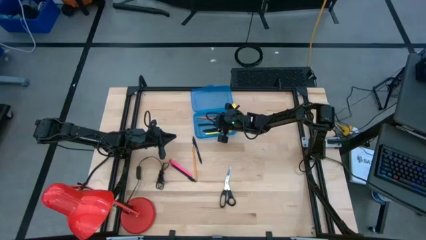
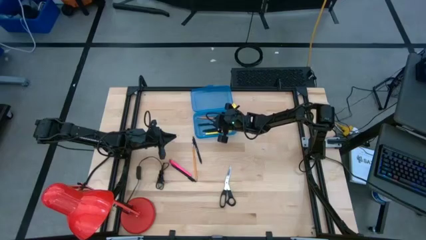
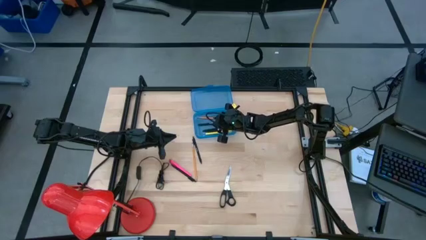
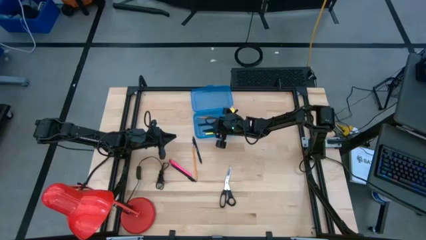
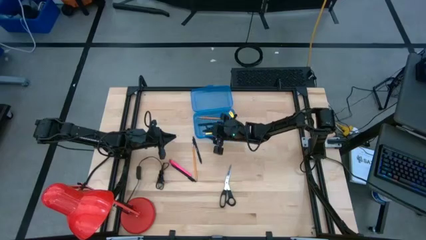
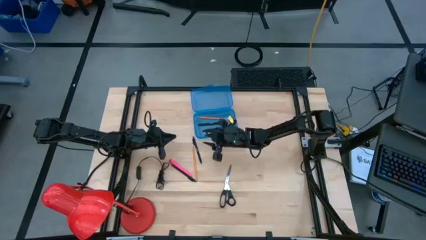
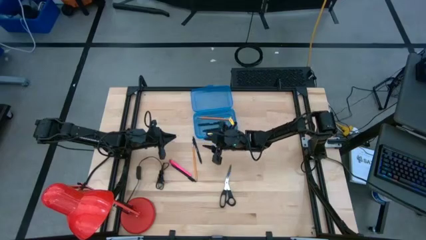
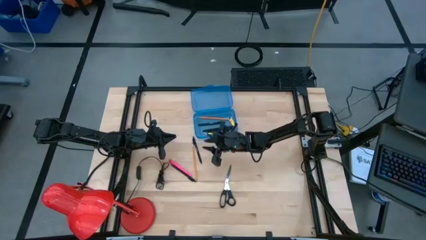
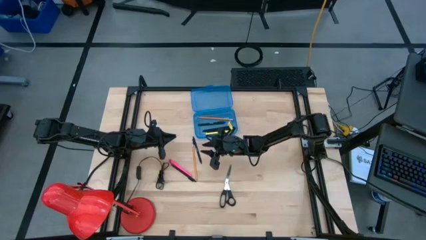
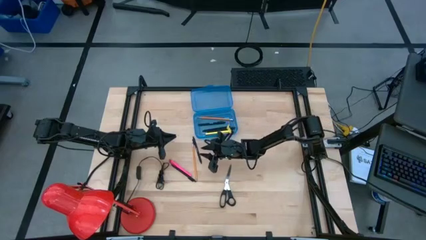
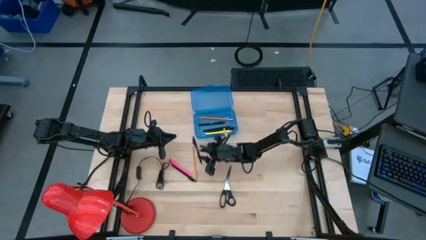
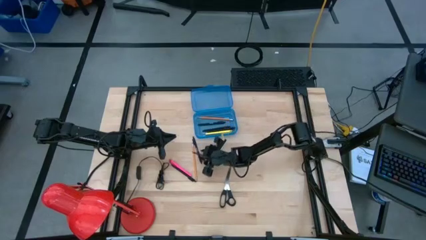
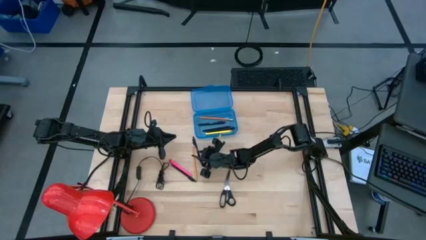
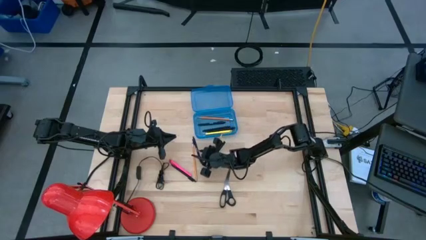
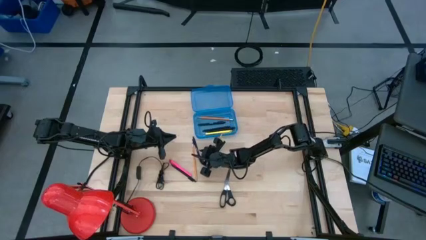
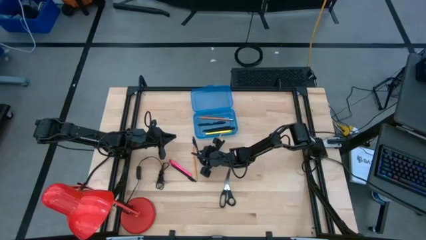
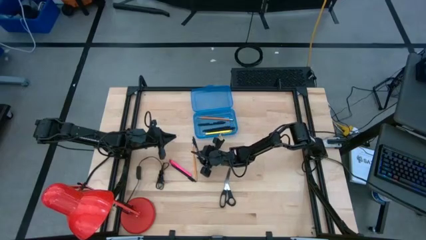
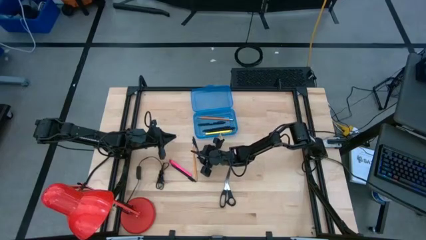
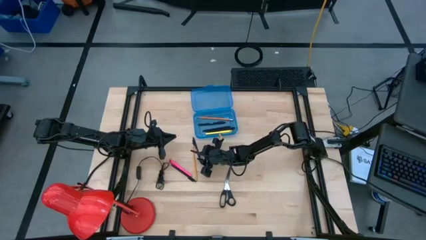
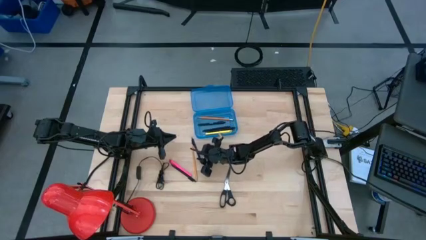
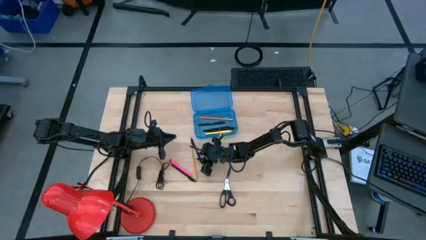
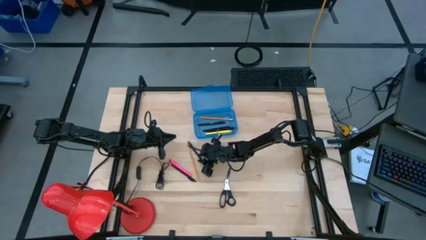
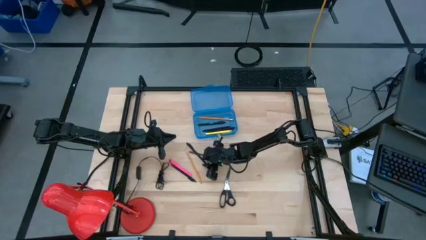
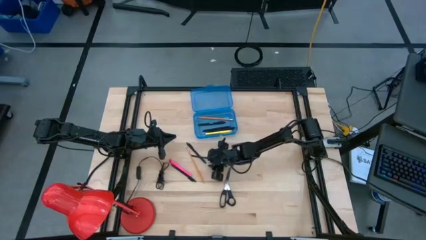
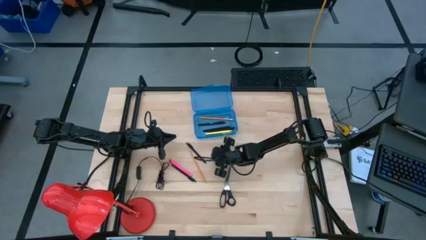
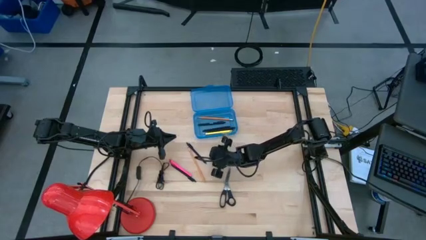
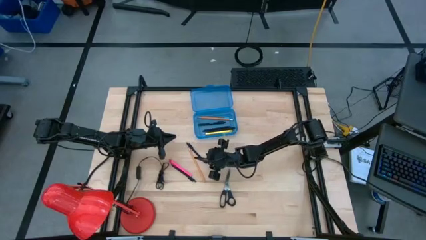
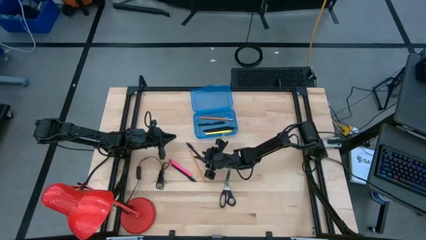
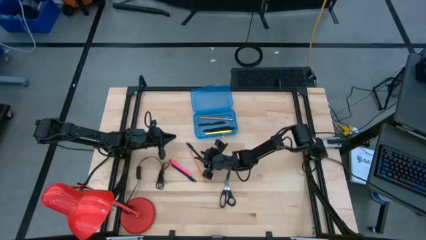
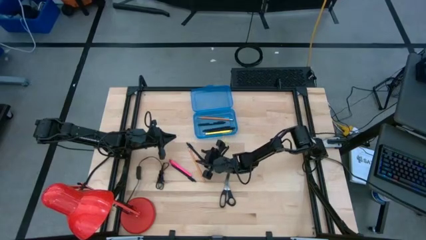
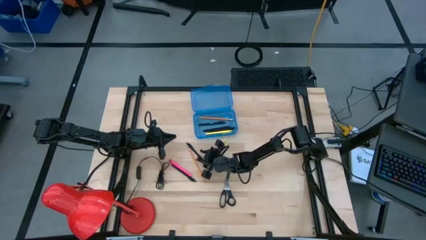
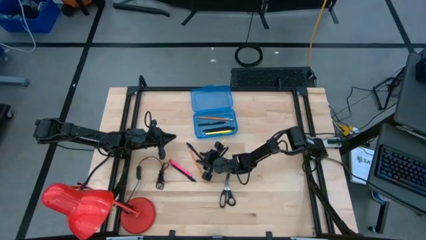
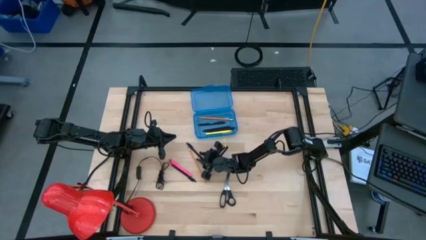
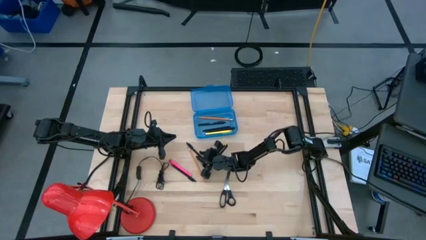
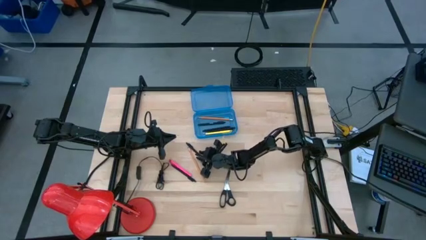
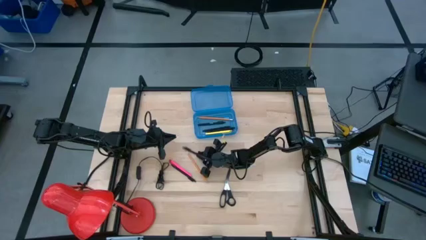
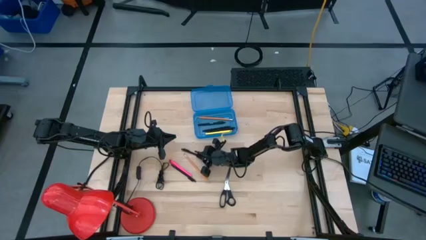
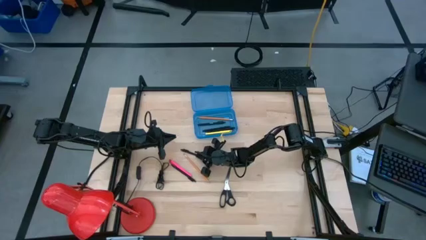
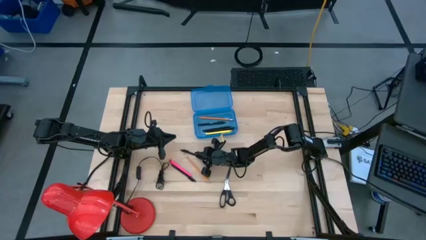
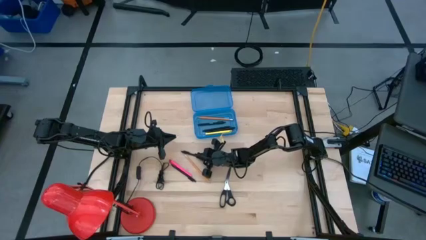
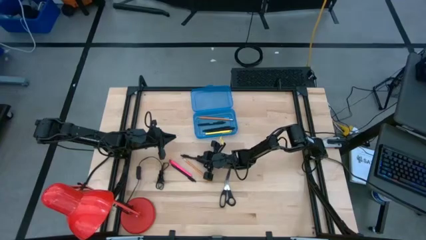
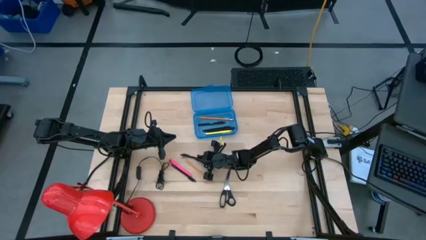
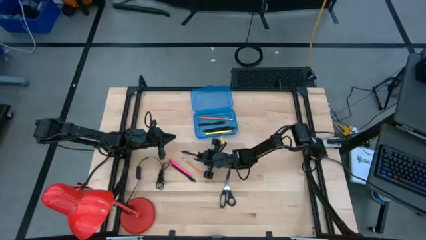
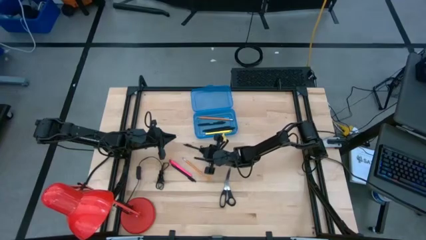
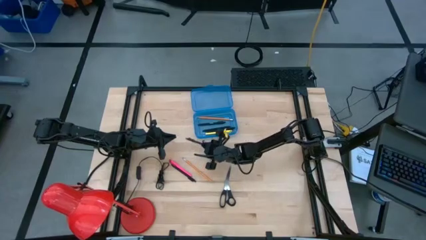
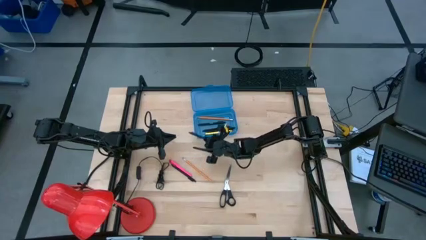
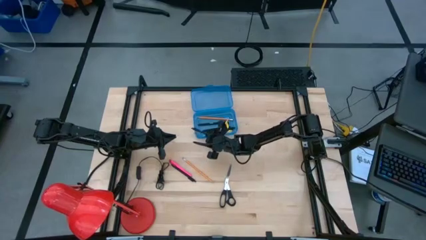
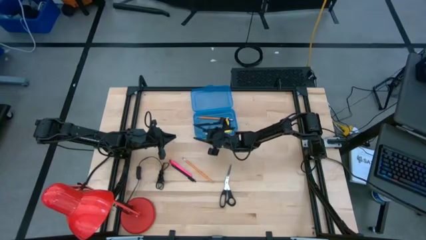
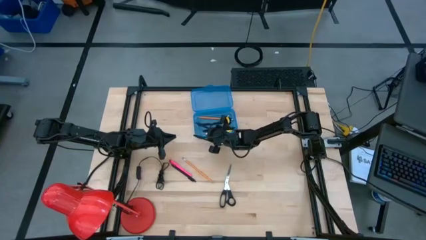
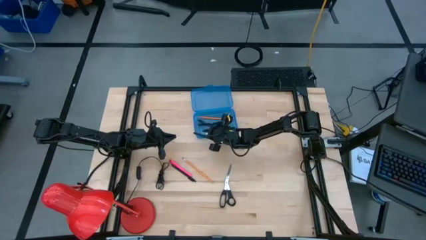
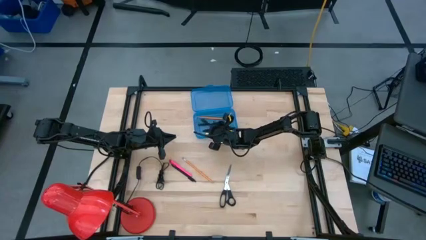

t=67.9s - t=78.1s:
Task: Pick & place school supplies into a supply box
Put the black pen into the blue supply box

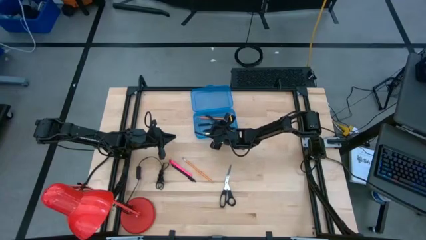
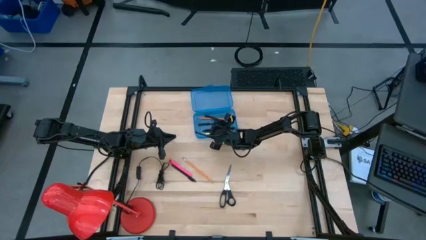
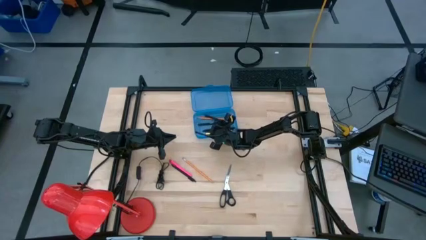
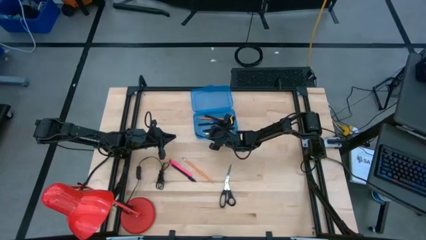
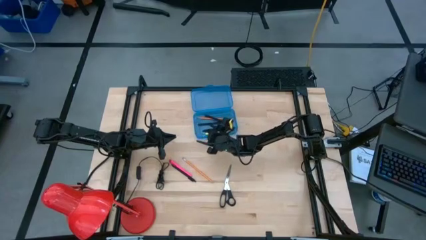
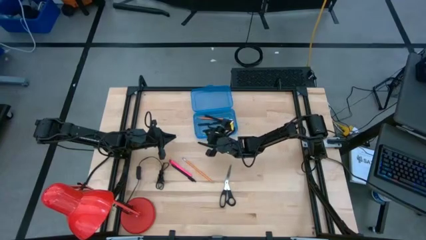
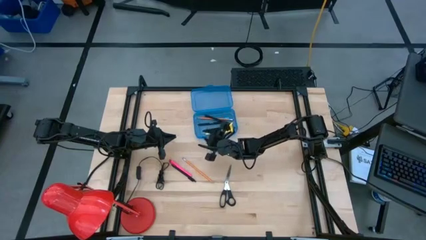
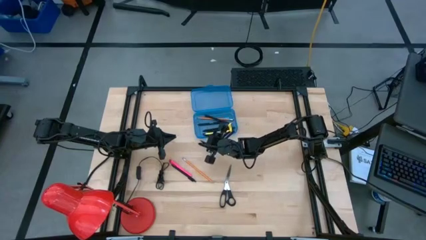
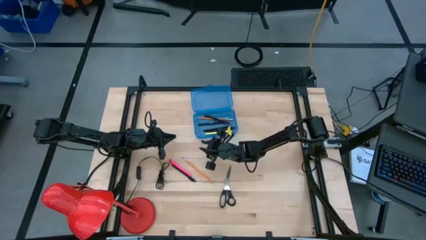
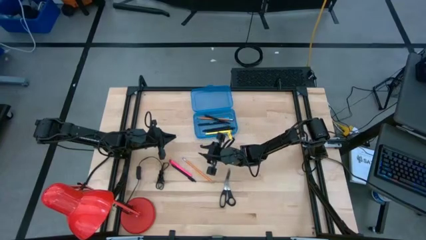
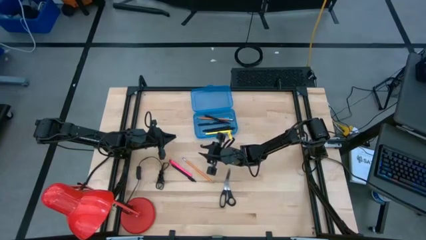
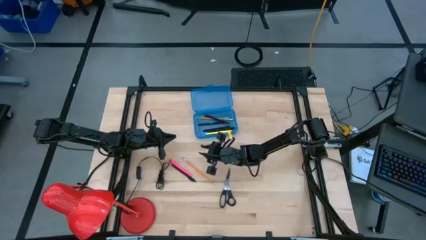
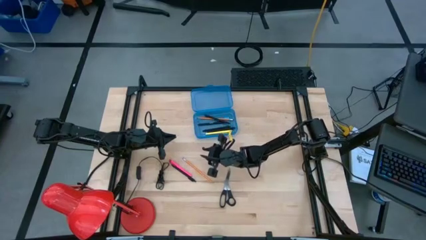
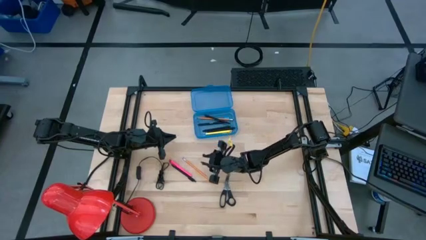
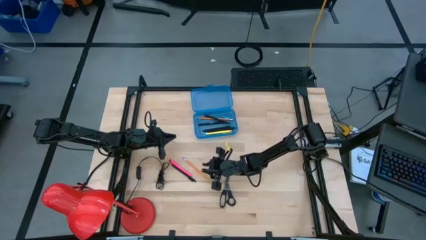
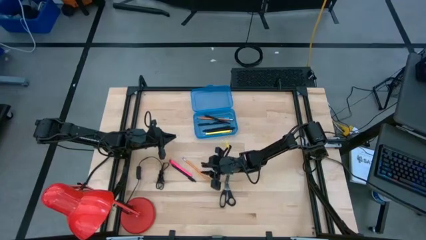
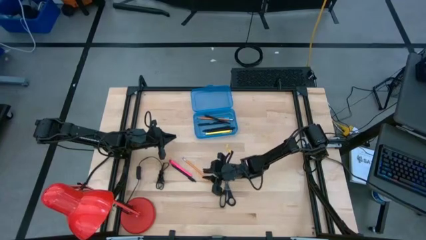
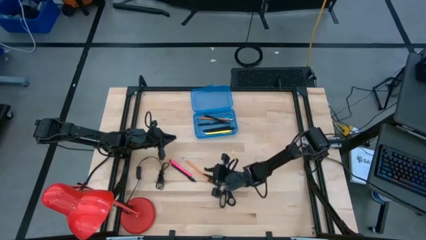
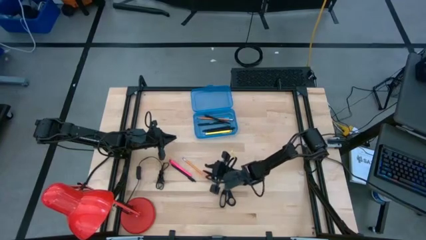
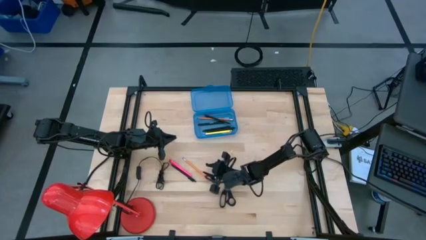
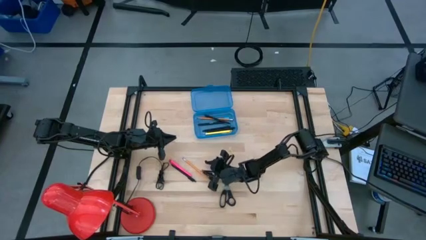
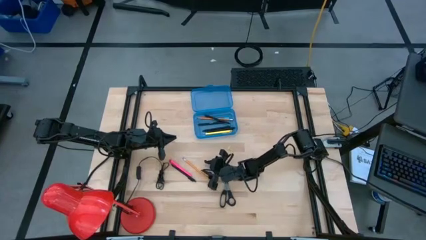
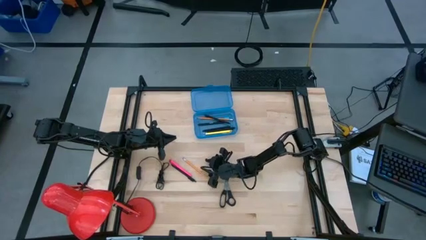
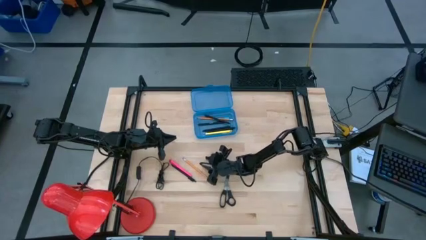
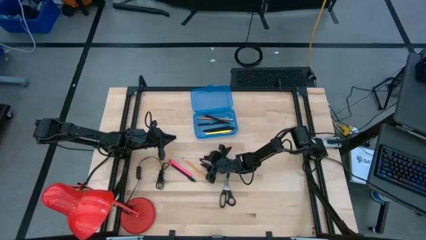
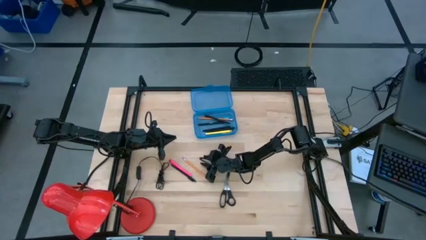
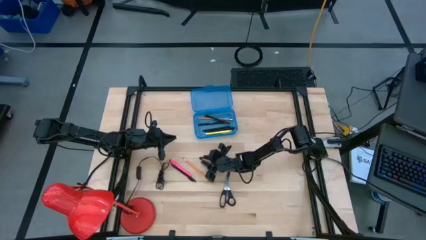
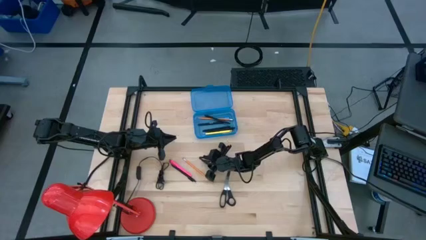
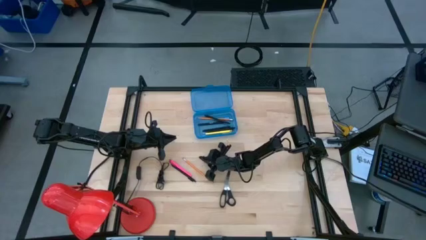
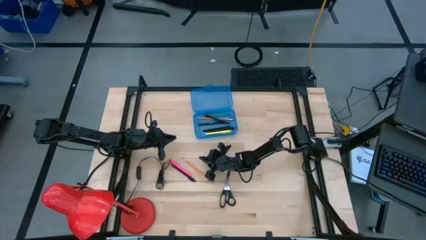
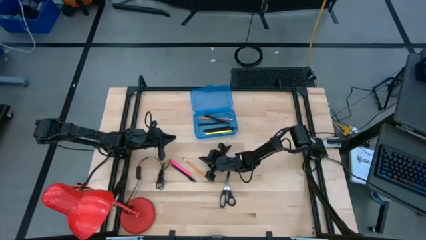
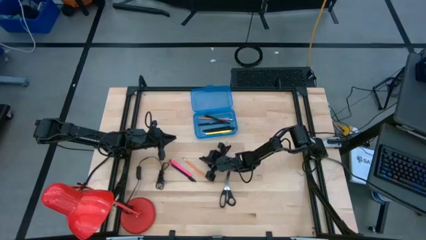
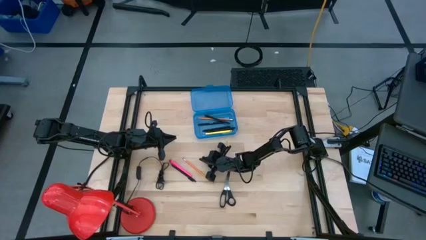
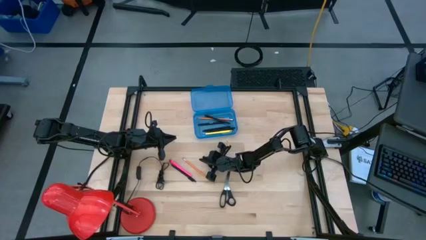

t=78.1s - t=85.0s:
Put the orange pencil into the blue supply box
